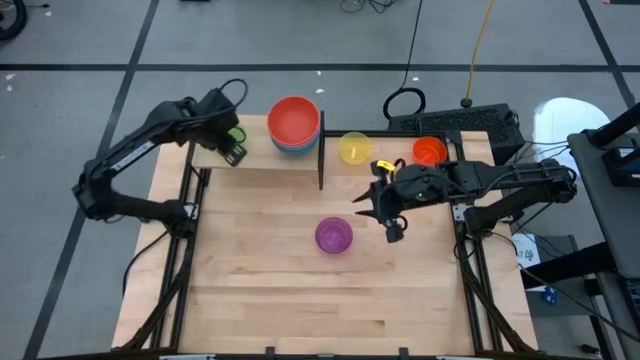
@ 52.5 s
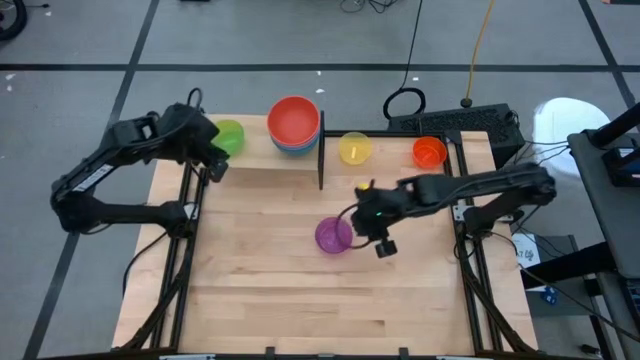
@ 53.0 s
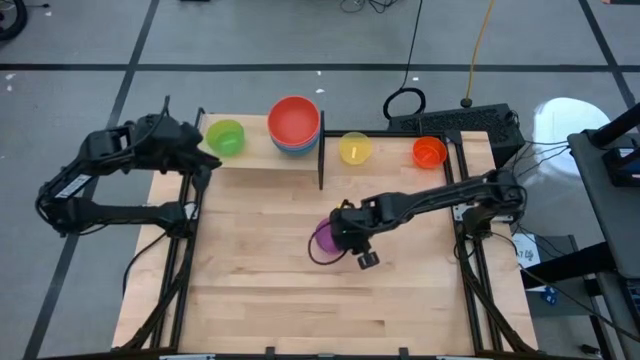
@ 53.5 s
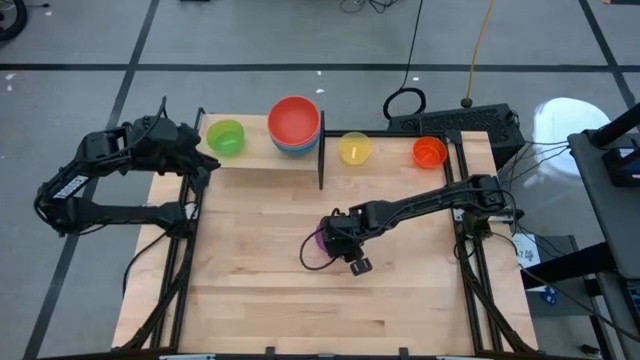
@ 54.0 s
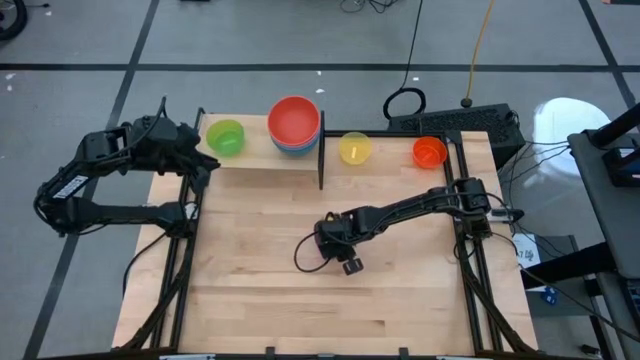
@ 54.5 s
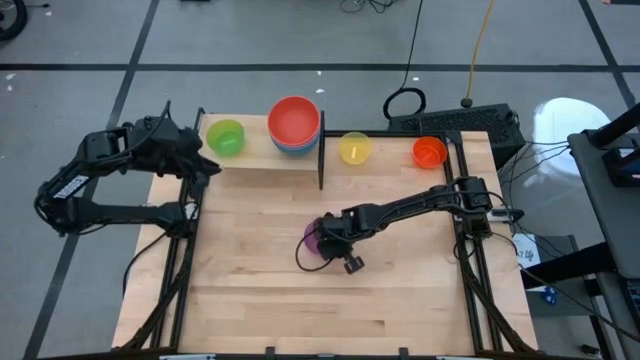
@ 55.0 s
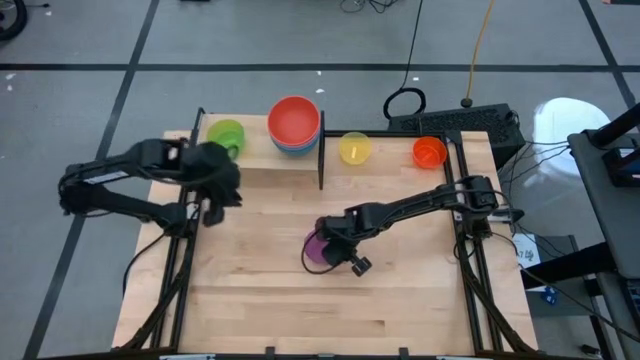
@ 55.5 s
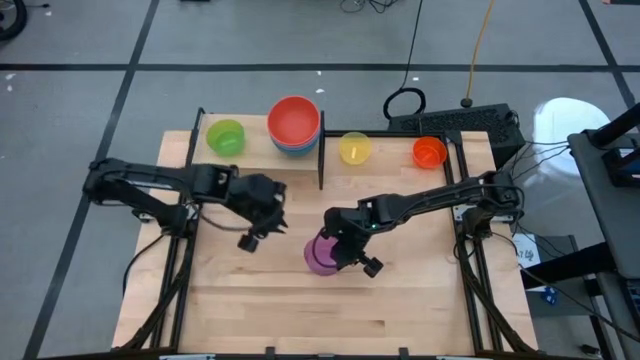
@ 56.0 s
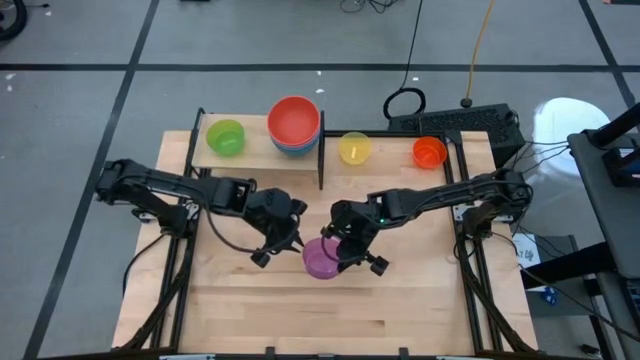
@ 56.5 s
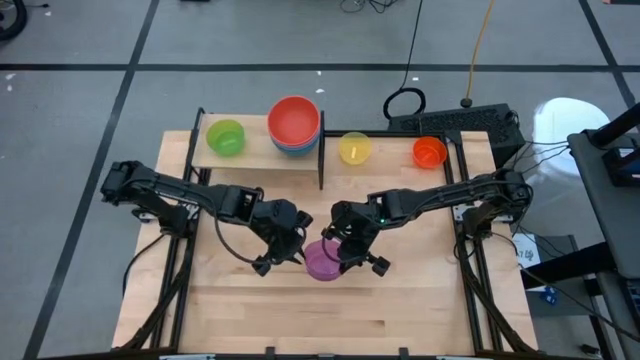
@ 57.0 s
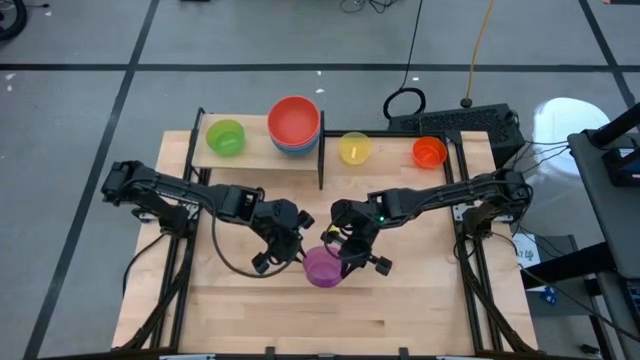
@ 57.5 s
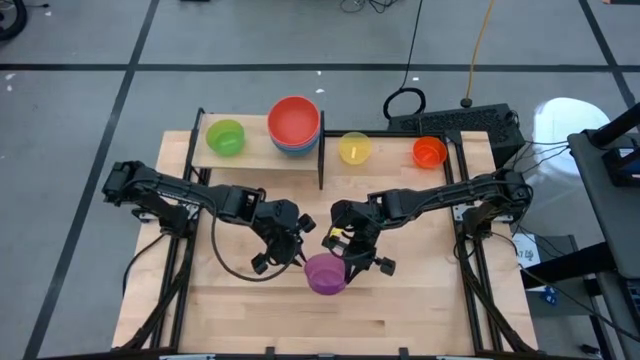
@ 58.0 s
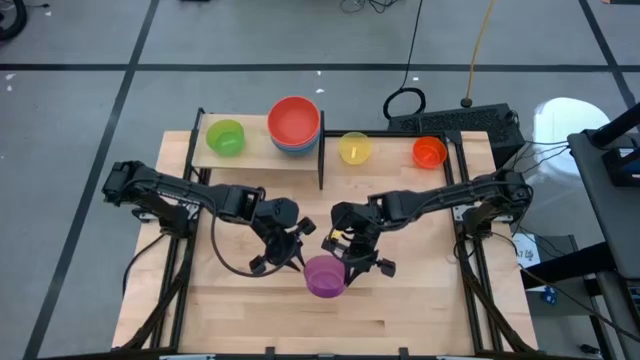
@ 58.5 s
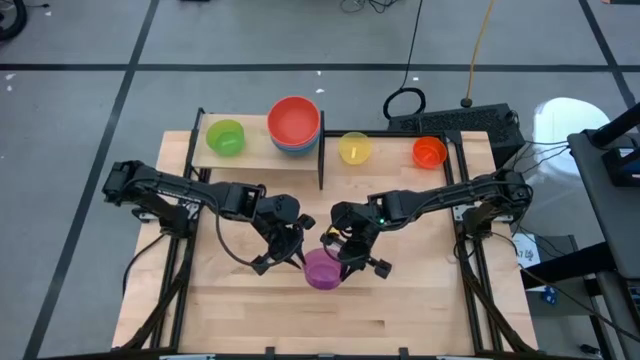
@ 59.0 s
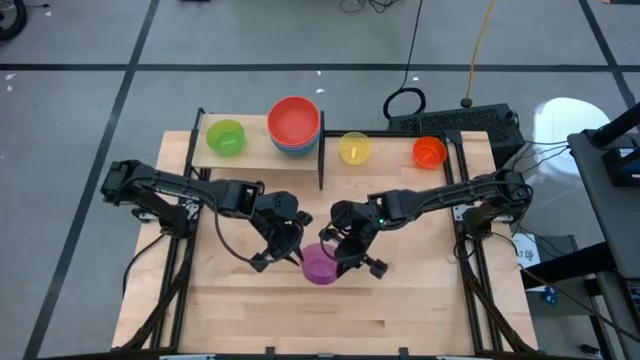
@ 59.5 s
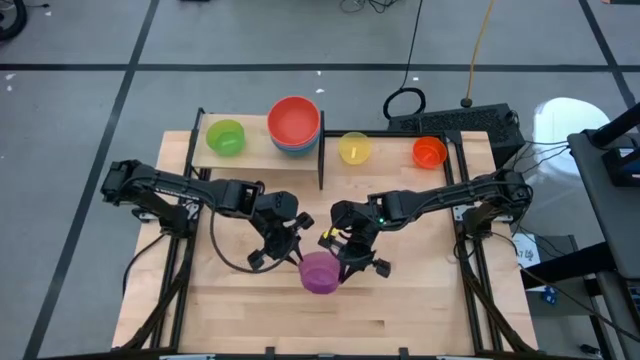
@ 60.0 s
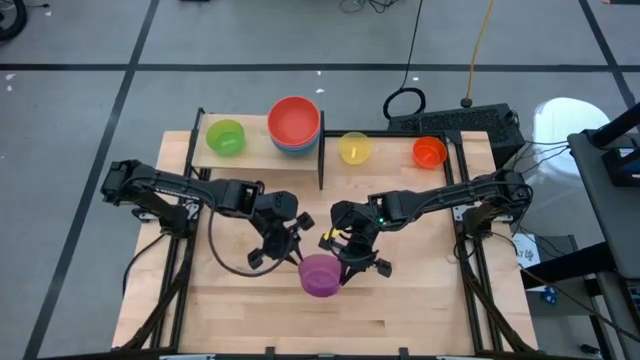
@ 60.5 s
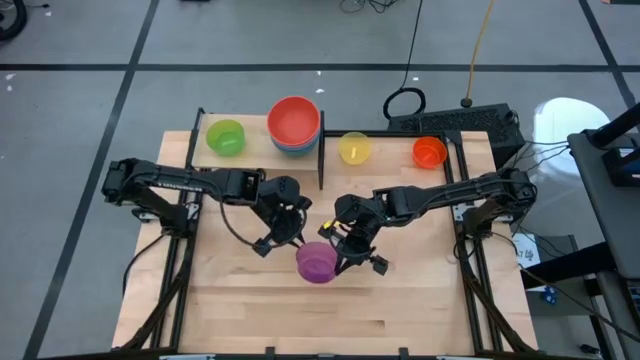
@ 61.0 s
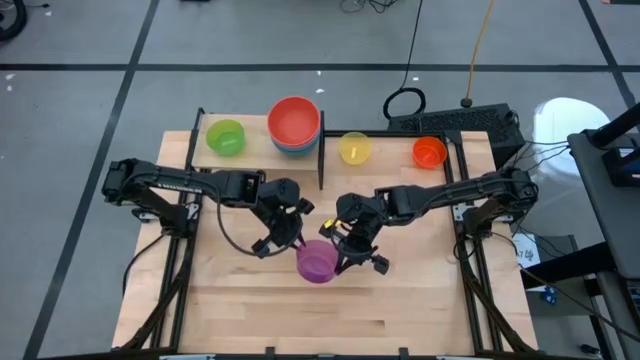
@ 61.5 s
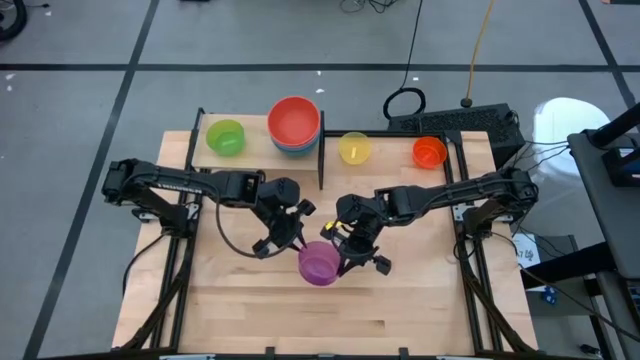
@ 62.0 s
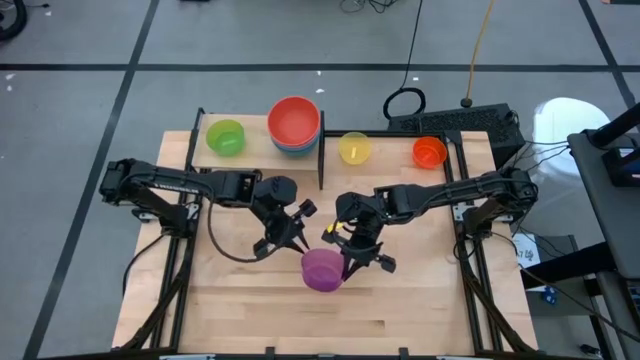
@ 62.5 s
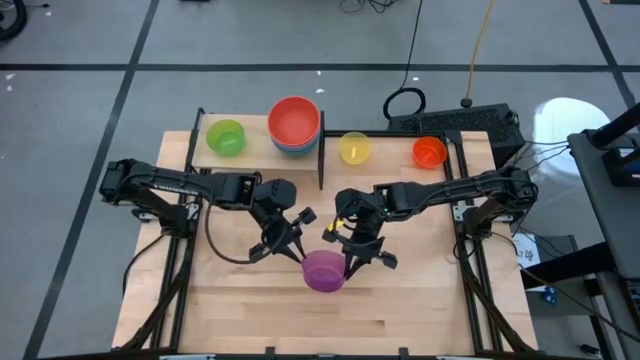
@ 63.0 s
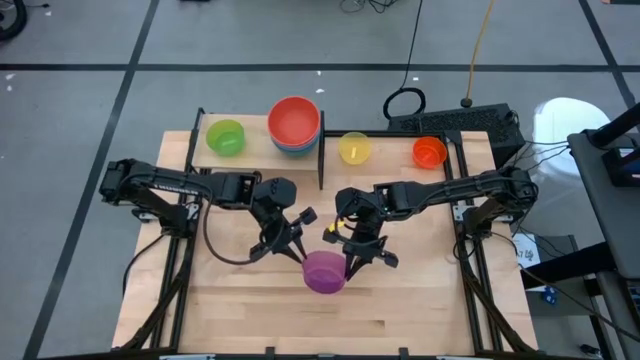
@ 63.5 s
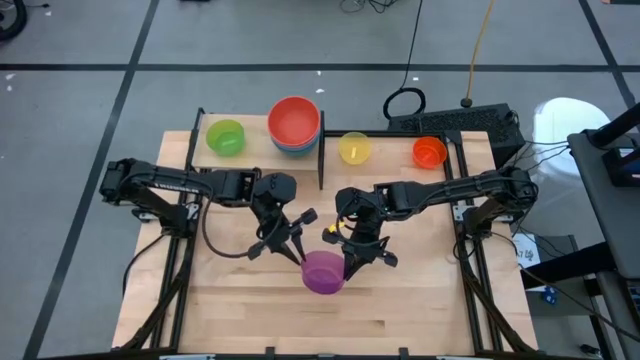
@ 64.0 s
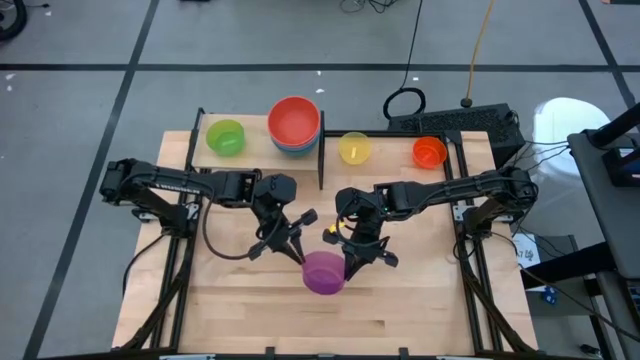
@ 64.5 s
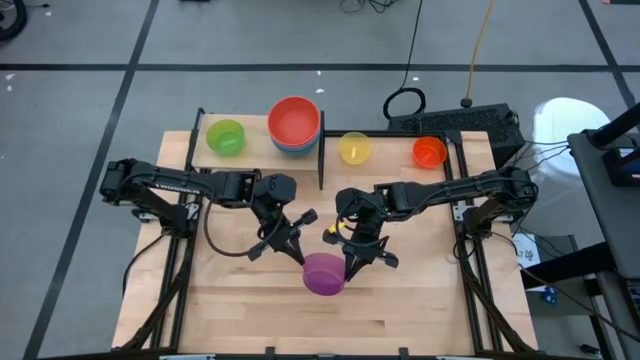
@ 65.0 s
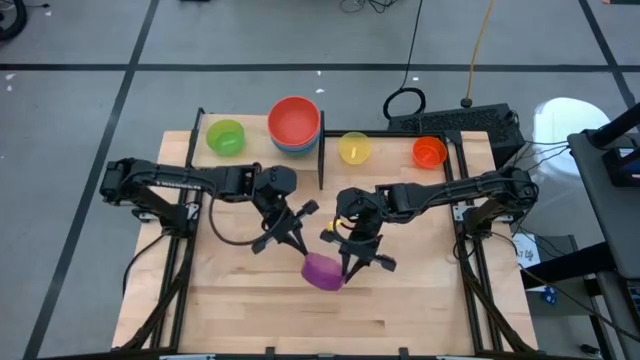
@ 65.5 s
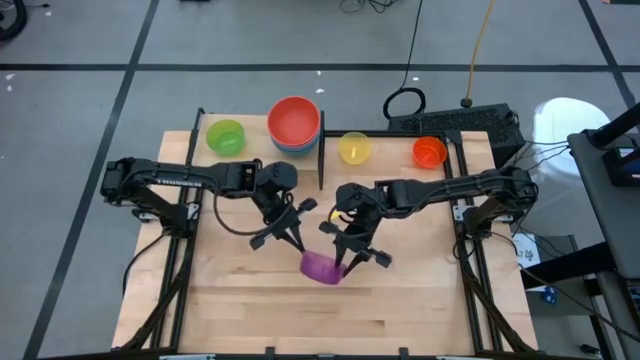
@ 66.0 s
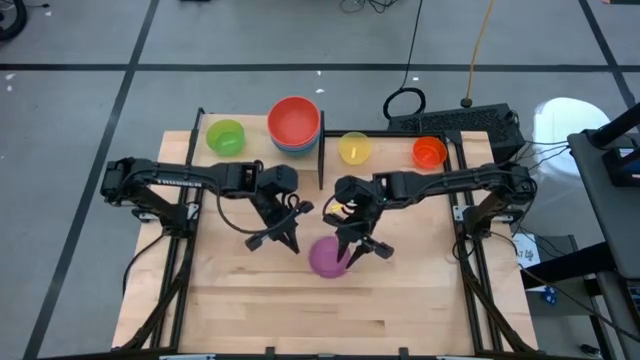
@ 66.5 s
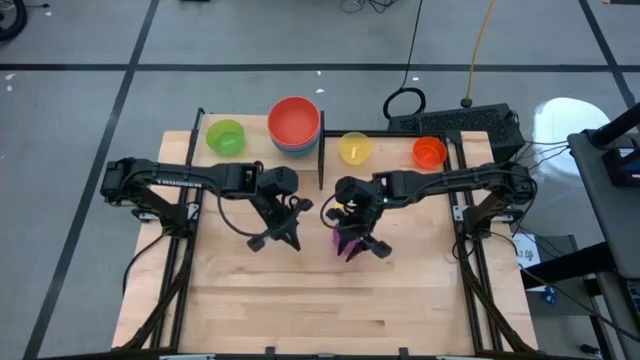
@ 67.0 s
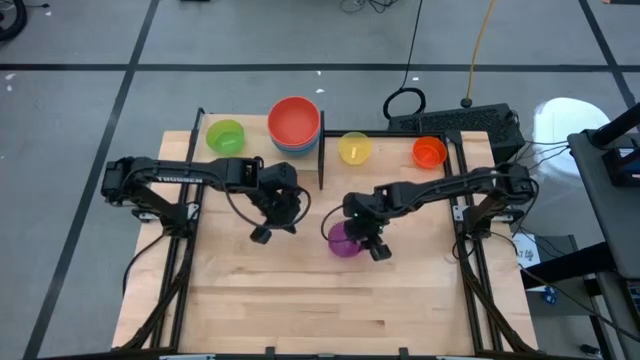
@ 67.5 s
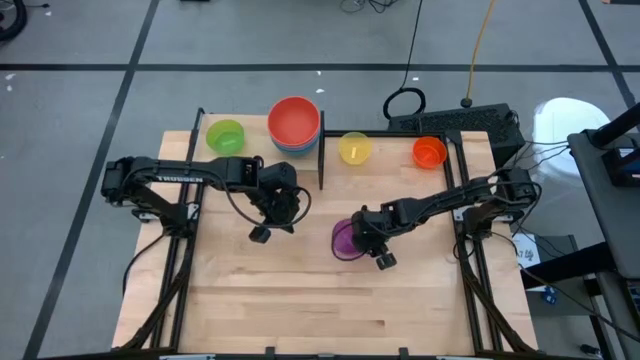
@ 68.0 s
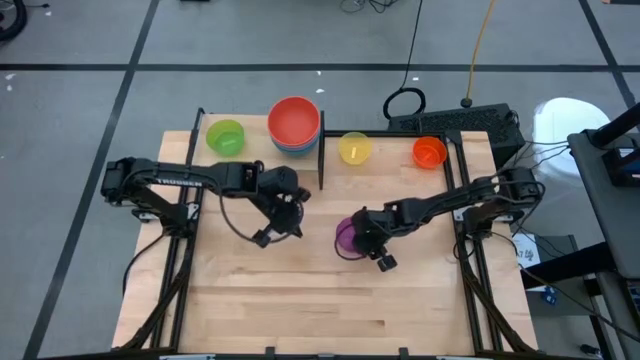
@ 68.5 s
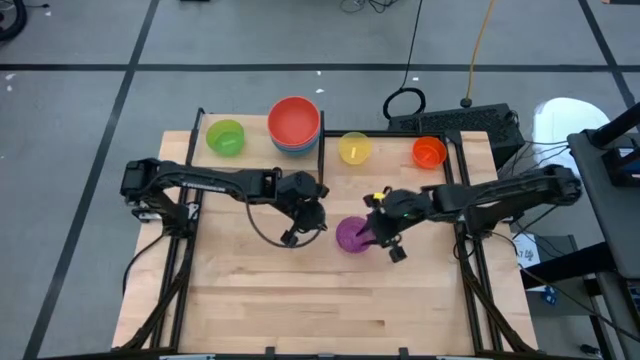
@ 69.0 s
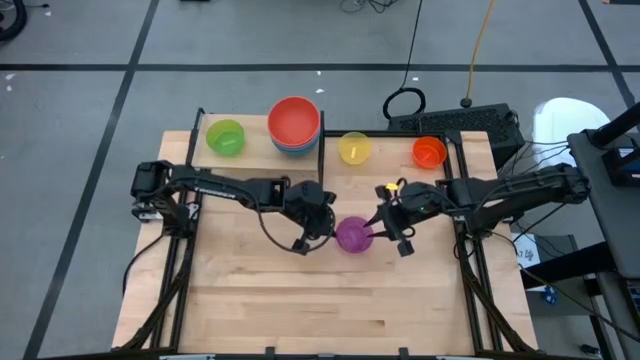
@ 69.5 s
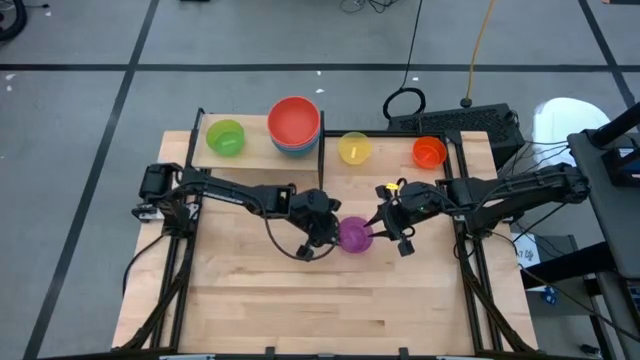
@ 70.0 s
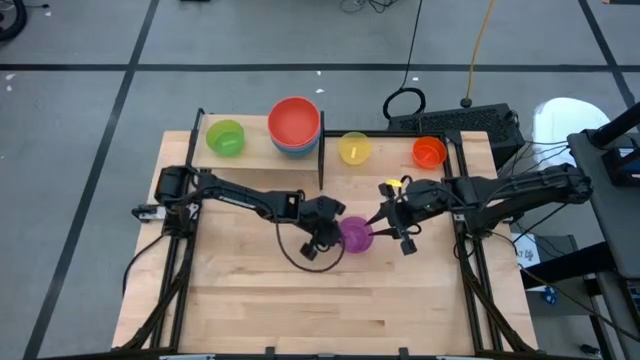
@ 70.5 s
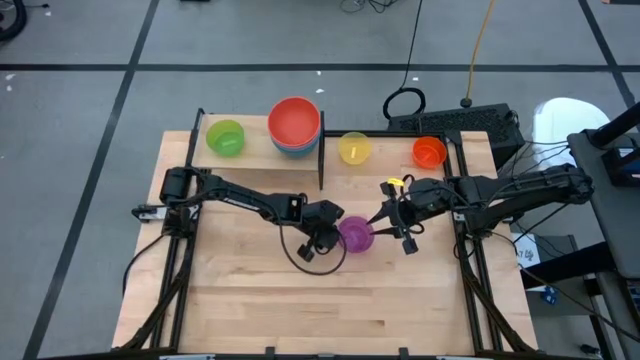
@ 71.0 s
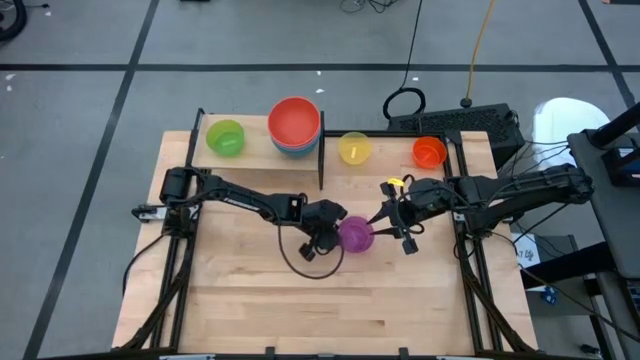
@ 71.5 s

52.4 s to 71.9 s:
Task: Place and stack bowls onto a shelf
Stack the purple bowl on top of the green bowl on the shelf
